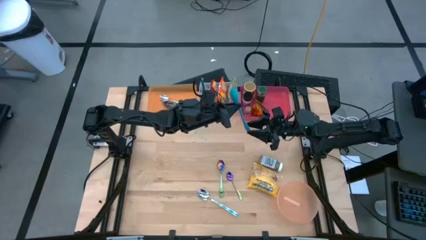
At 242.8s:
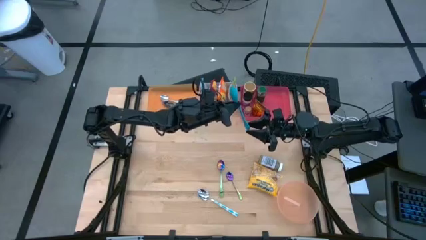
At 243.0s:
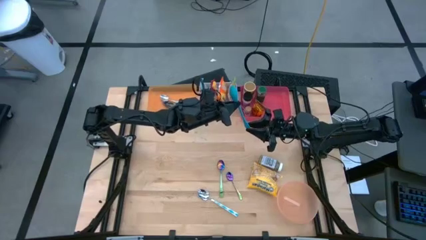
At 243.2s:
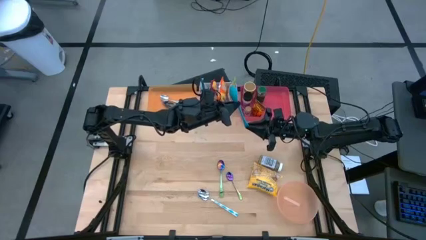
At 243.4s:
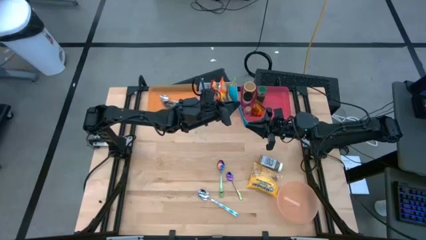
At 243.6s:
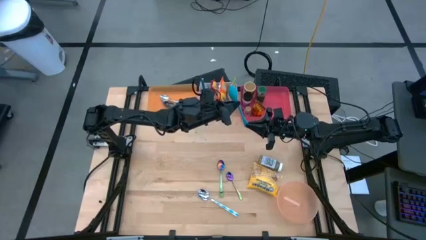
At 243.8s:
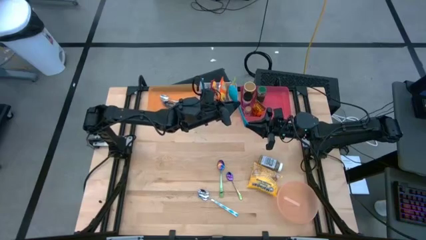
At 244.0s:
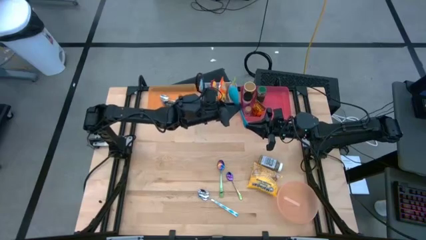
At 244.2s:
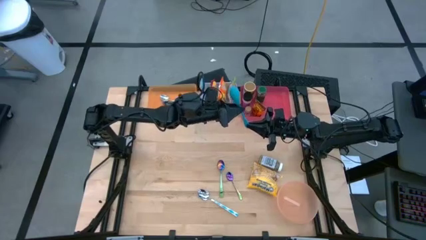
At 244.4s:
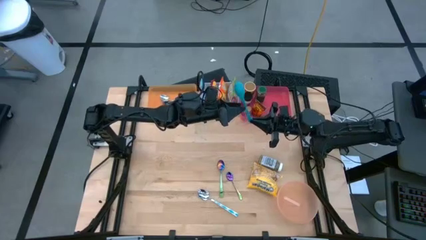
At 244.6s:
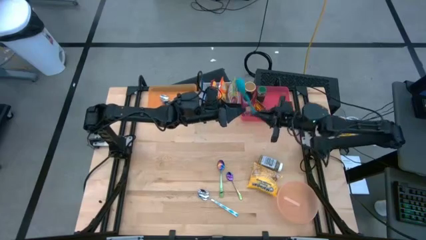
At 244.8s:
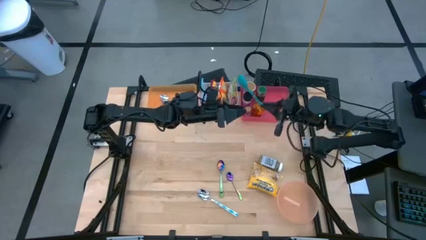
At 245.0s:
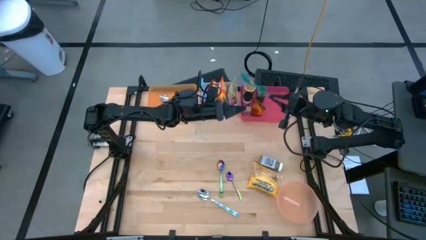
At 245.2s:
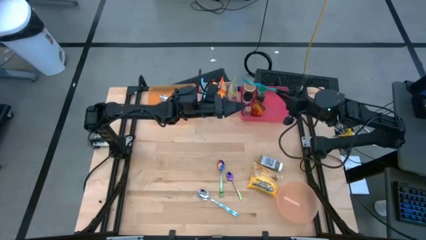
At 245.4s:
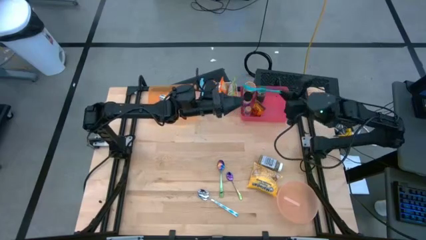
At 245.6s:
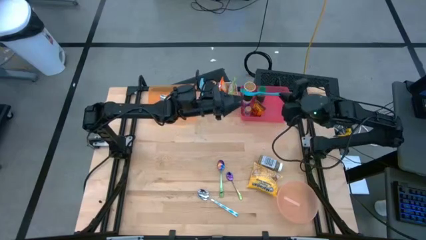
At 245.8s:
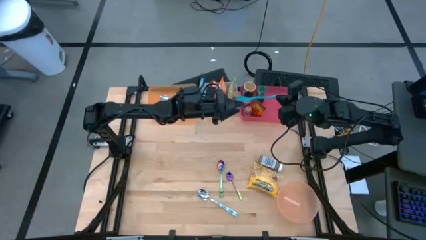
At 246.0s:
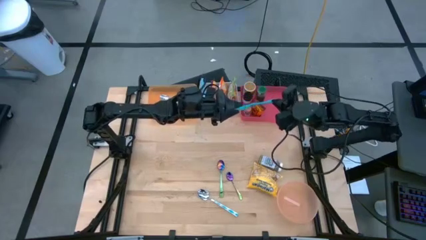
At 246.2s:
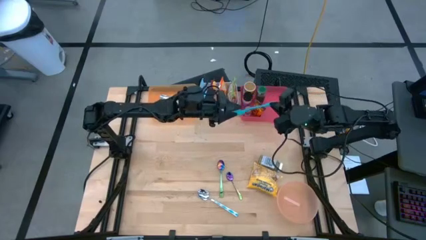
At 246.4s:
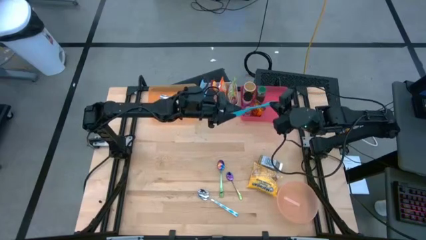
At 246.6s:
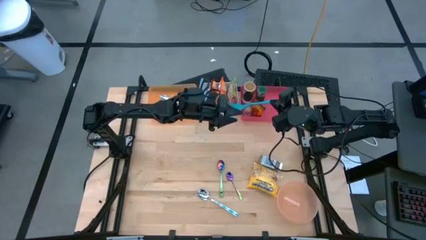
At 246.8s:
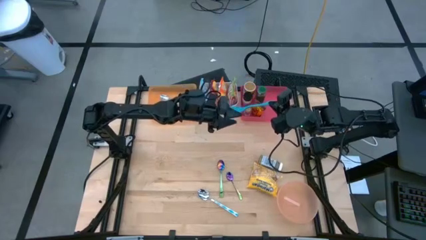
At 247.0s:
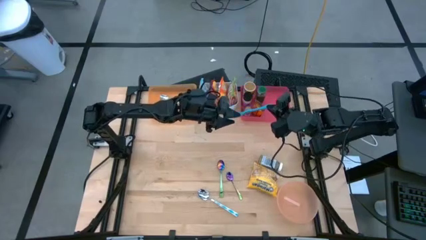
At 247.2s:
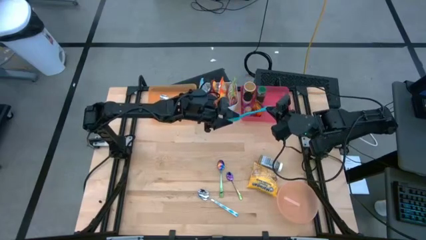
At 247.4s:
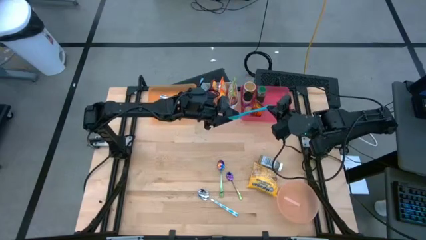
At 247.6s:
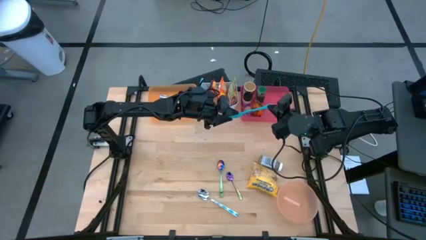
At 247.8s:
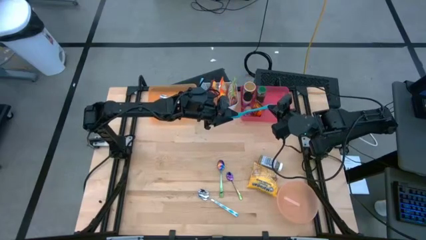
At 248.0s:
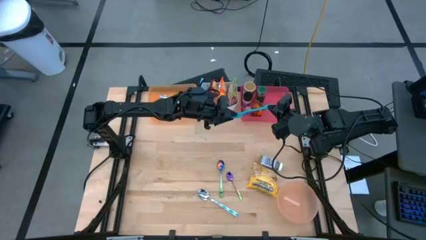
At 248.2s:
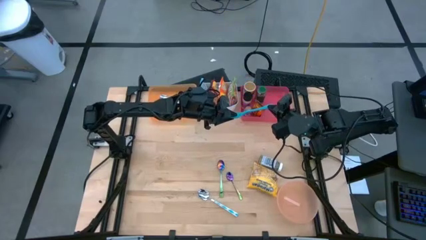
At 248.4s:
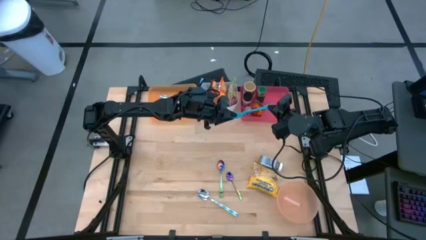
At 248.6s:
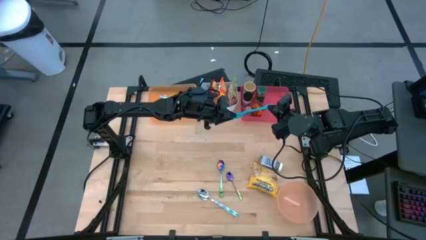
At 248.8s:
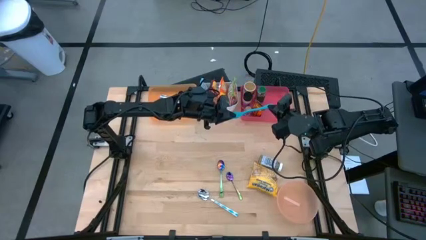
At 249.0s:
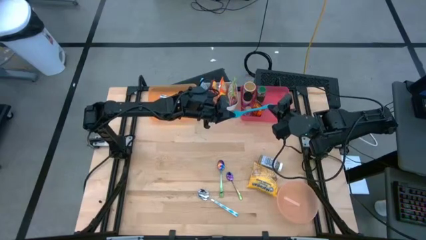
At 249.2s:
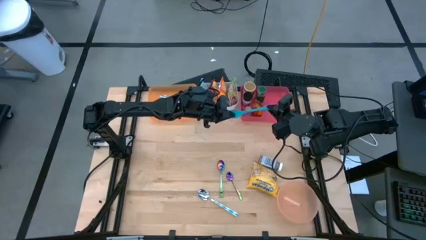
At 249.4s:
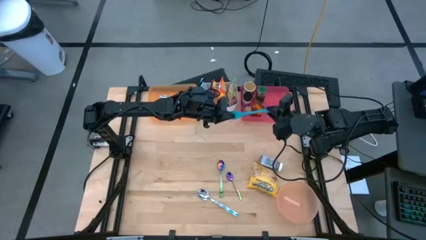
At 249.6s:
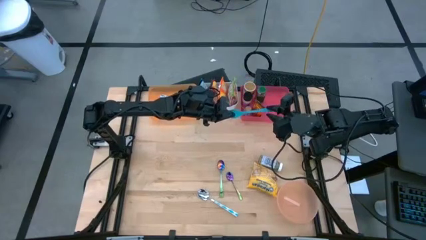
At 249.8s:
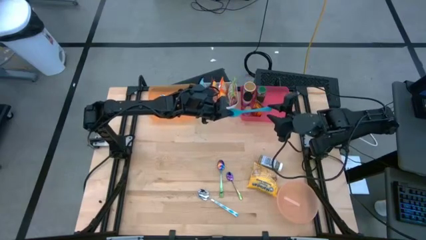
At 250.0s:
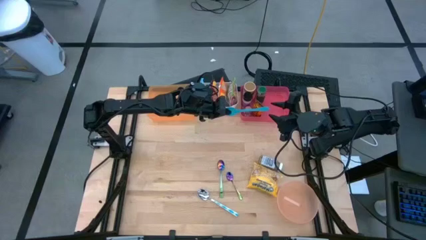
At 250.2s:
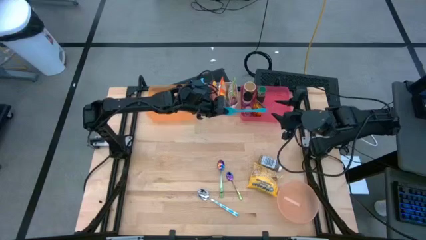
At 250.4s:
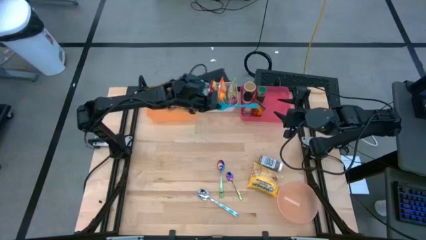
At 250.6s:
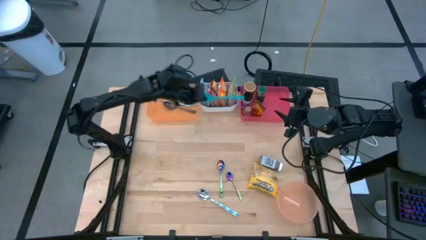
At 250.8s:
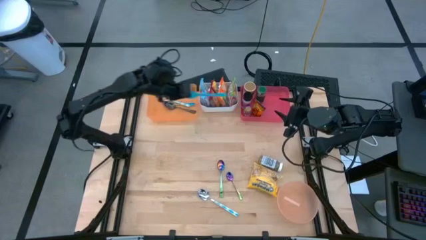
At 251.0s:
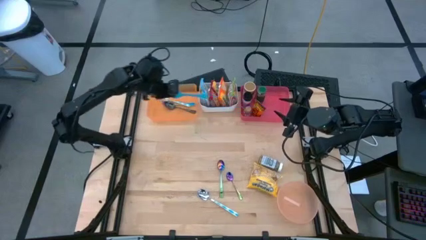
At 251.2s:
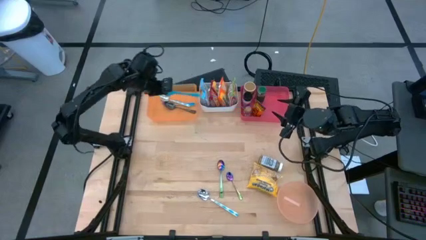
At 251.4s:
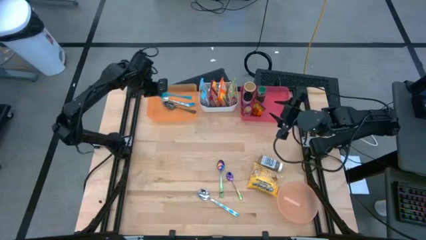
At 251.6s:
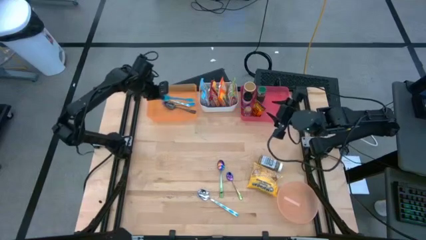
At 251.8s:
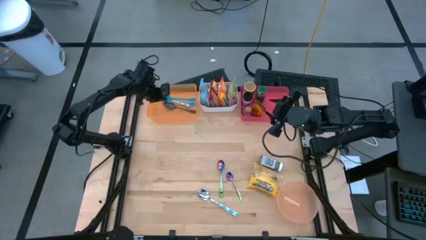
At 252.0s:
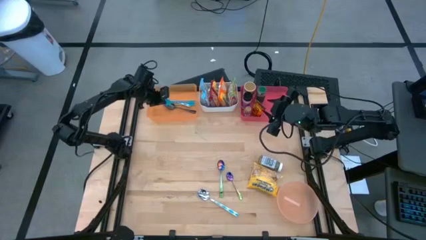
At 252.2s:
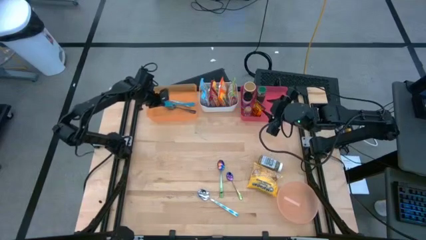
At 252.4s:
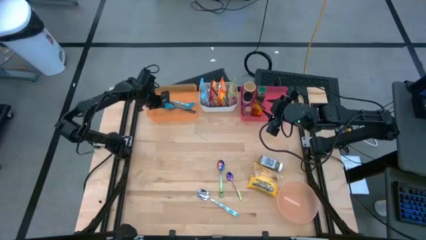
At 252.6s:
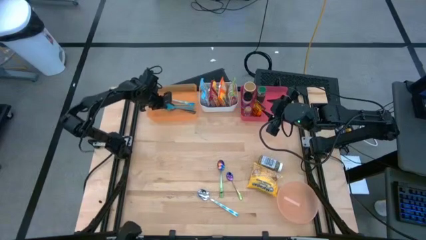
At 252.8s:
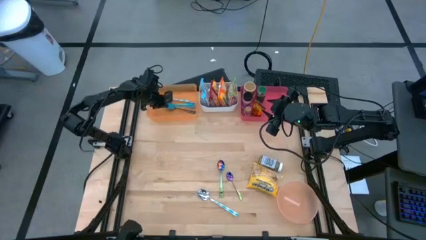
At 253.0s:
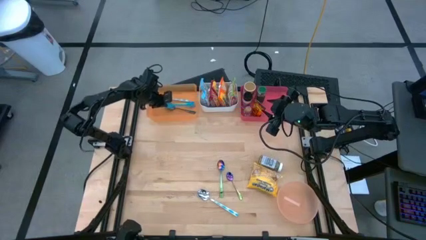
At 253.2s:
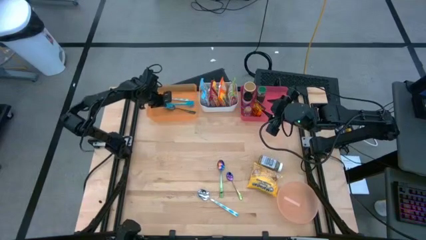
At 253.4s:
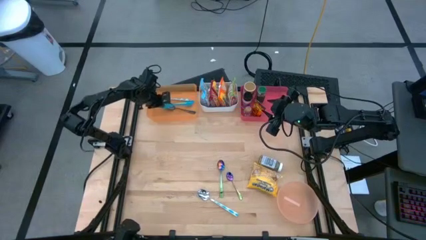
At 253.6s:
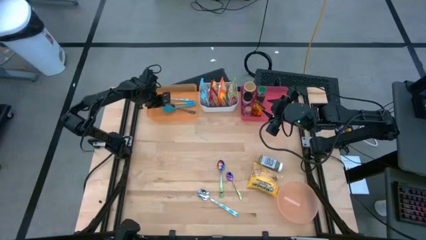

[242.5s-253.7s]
Task: Pick & Place Food Item
Put the blue baby spoon into the orange bin
